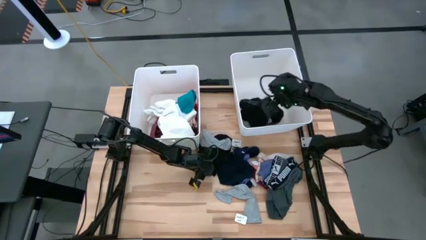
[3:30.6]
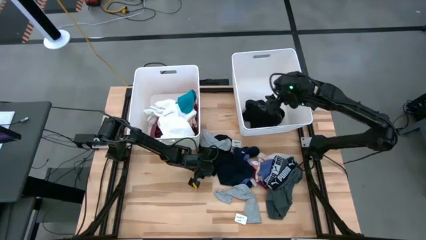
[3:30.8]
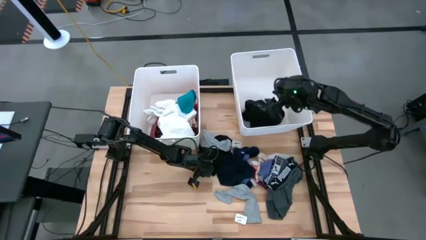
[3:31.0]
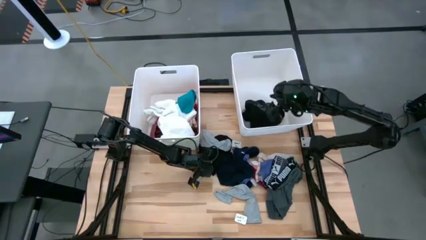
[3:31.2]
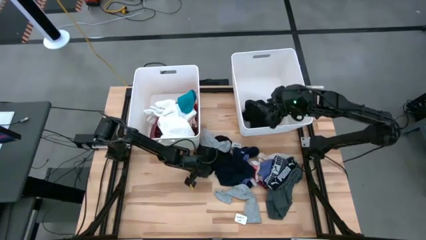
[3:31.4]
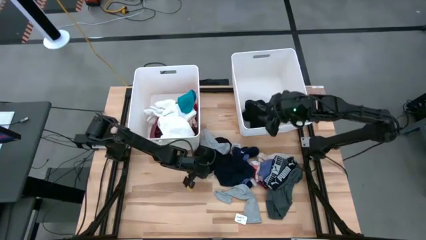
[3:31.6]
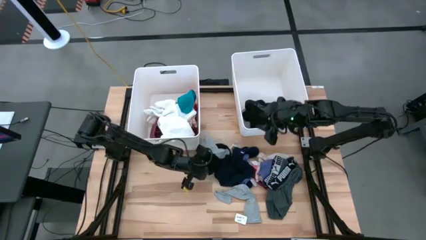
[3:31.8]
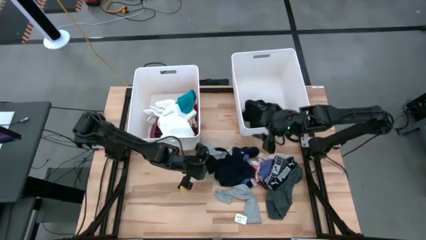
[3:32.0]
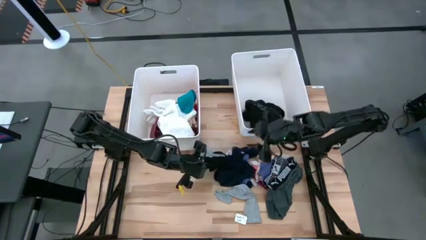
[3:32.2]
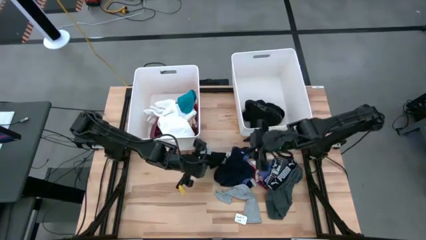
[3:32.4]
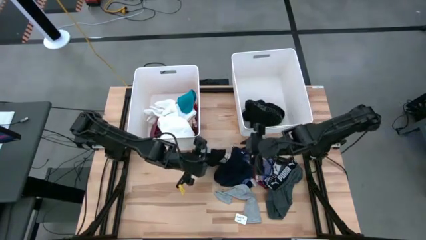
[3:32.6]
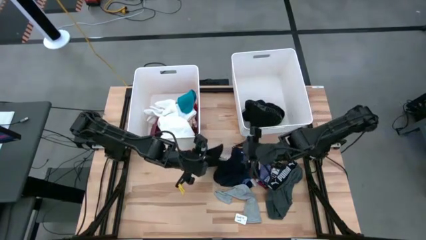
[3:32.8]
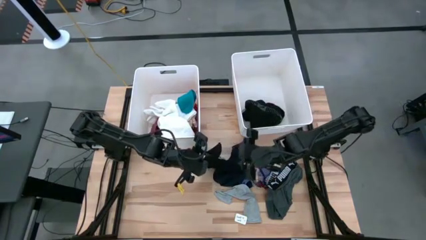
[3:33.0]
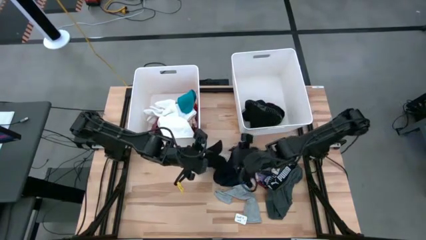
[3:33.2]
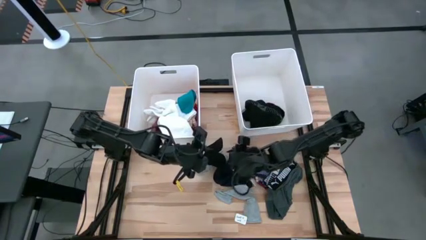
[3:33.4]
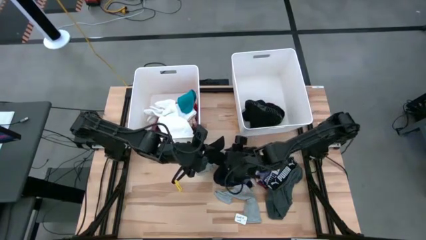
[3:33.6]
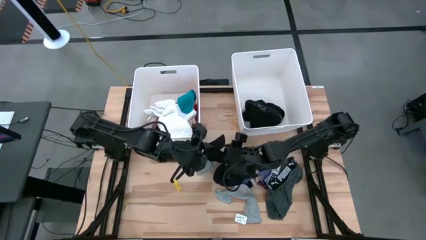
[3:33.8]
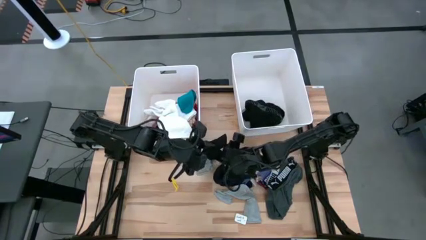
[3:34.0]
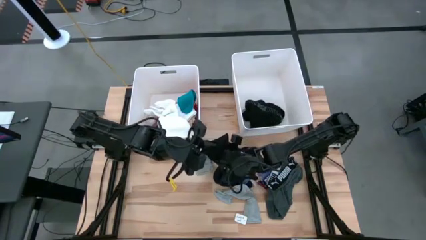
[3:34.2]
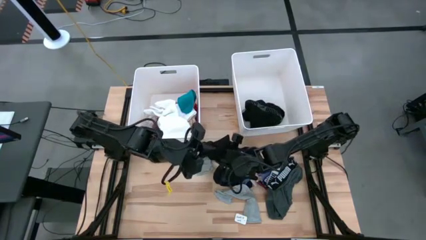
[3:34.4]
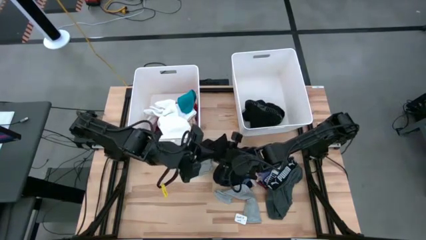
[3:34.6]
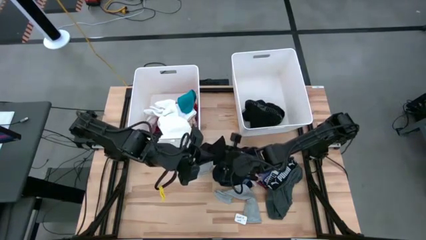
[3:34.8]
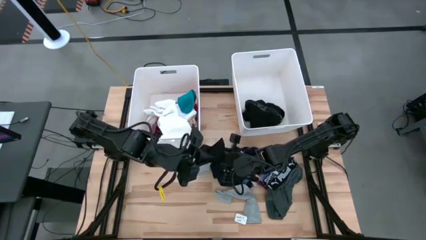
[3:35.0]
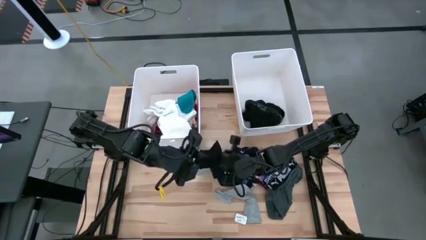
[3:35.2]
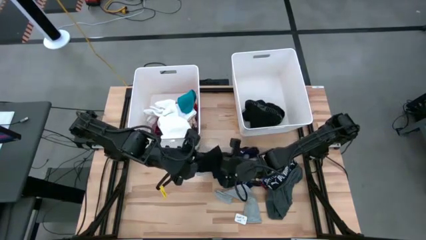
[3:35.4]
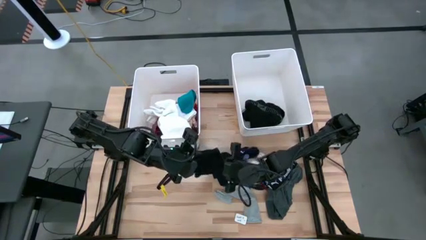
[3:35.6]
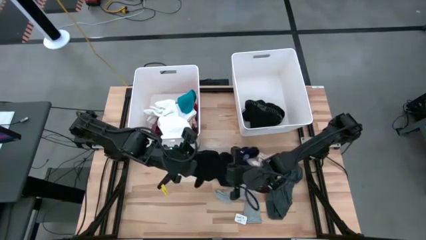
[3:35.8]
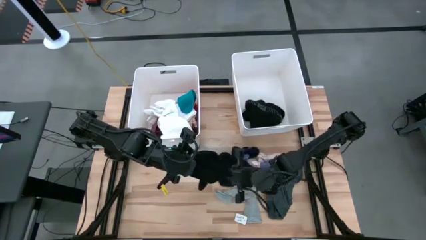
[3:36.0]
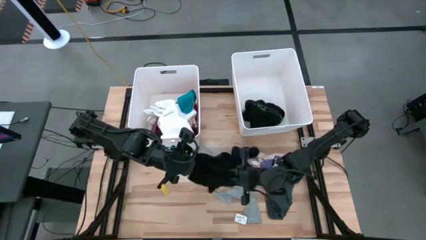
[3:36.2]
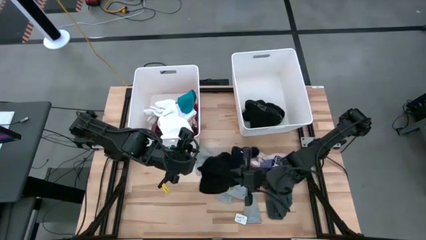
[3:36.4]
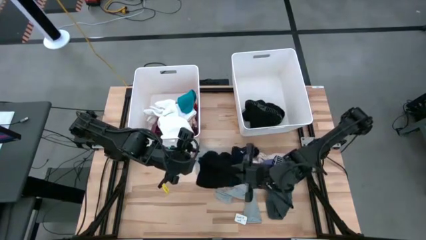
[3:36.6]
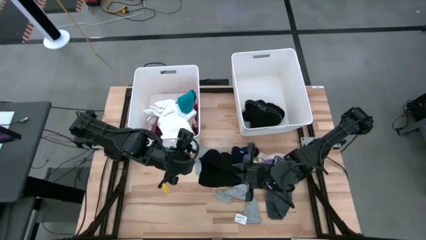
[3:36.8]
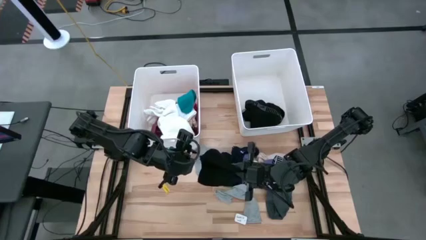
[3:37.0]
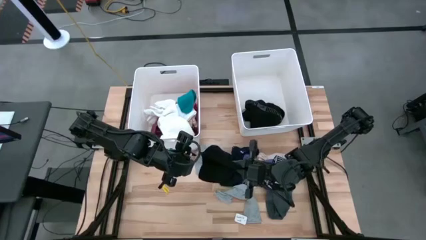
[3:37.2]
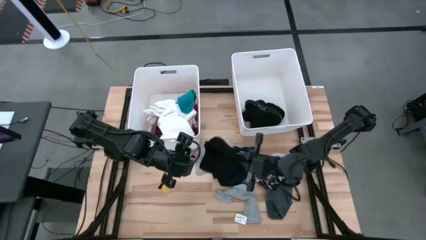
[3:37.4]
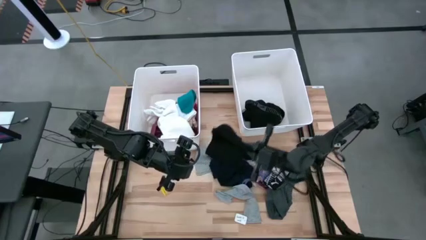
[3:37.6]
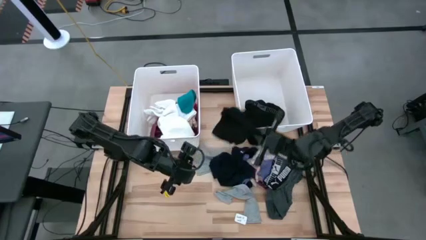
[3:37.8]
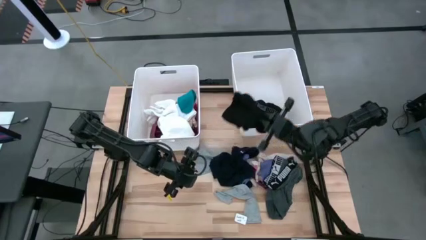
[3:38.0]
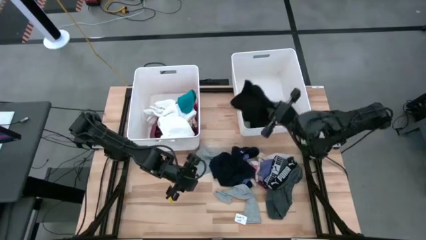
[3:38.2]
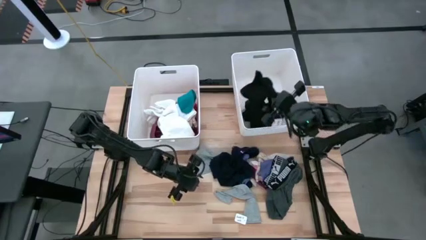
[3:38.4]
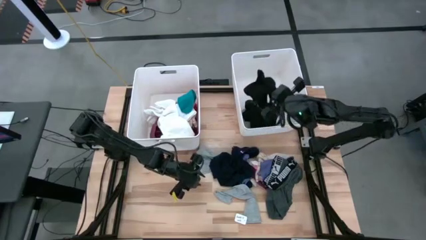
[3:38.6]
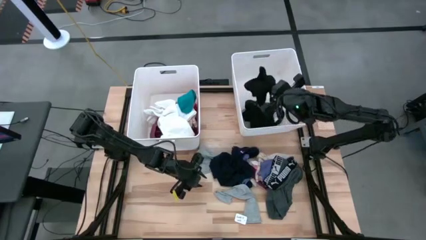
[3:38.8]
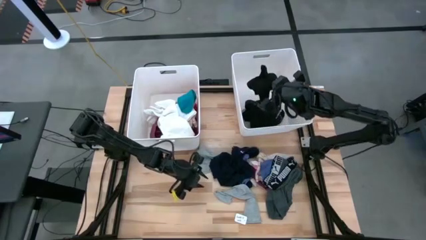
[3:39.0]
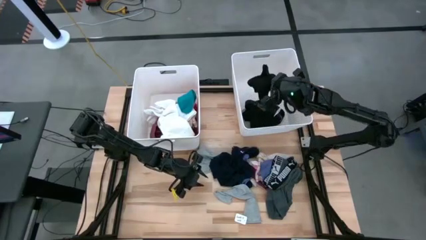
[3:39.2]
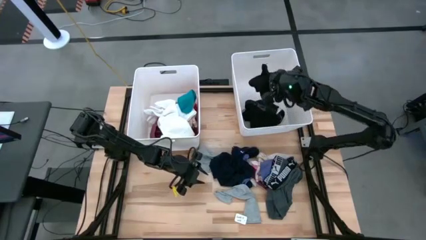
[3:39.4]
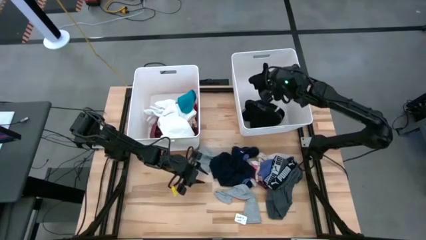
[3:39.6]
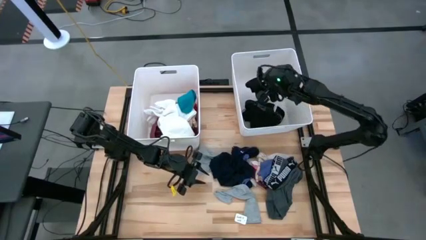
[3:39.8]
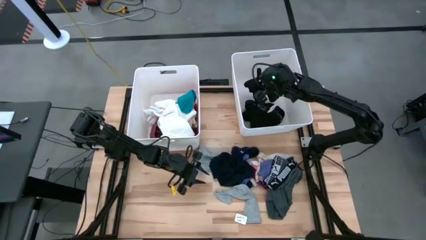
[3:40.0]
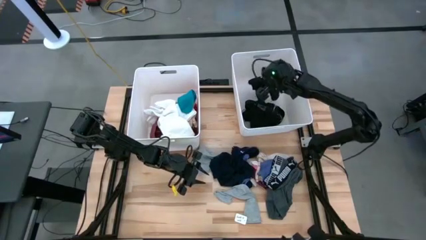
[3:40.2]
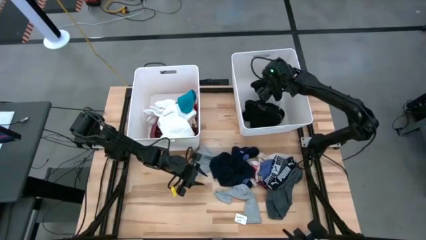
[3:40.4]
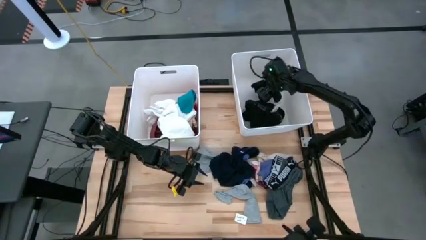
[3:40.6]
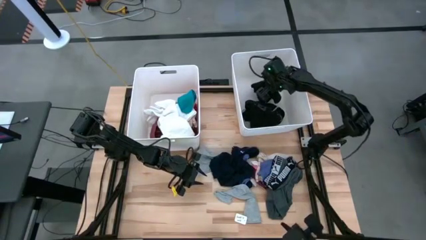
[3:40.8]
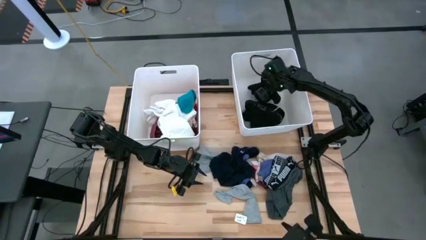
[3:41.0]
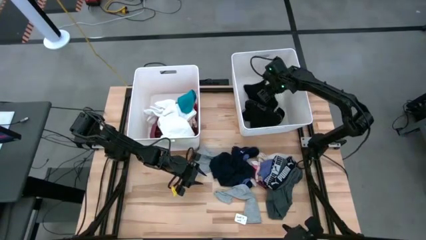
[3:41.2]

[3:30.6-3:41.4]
Task: Sort clothes
Put the black underwear into the right white bin
